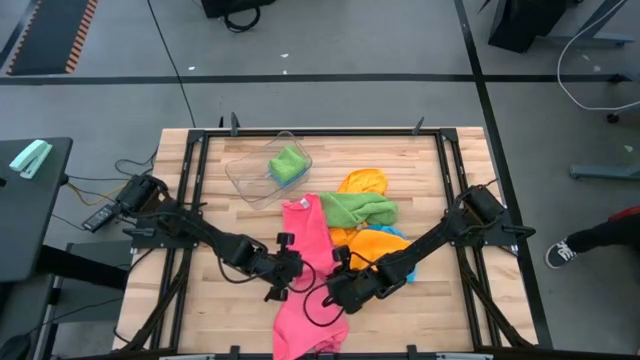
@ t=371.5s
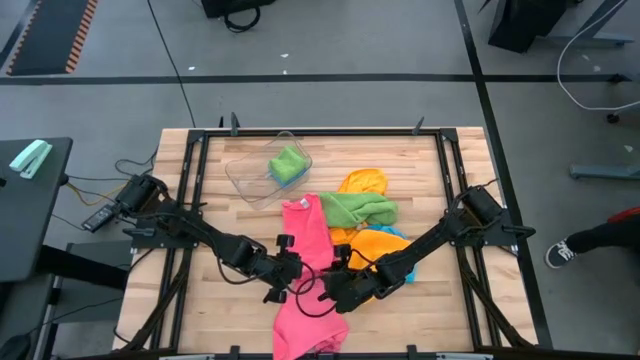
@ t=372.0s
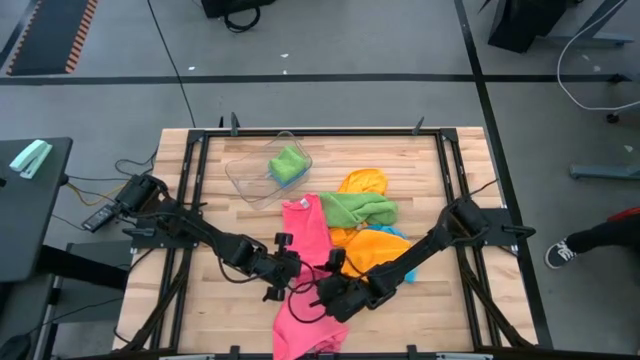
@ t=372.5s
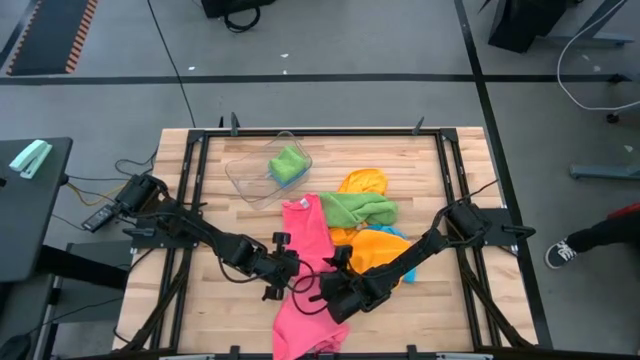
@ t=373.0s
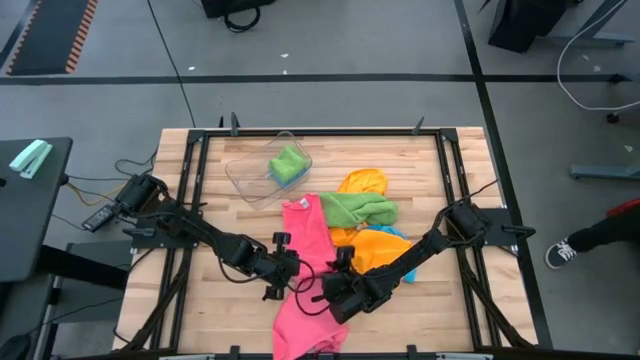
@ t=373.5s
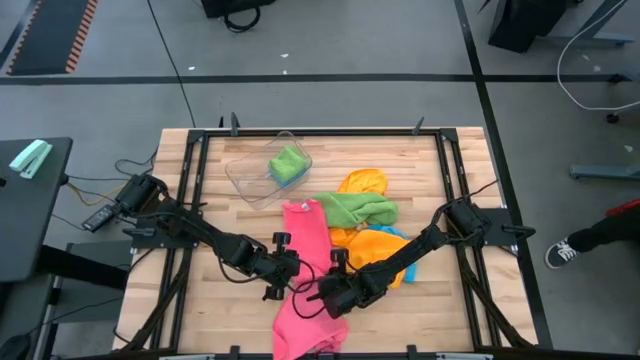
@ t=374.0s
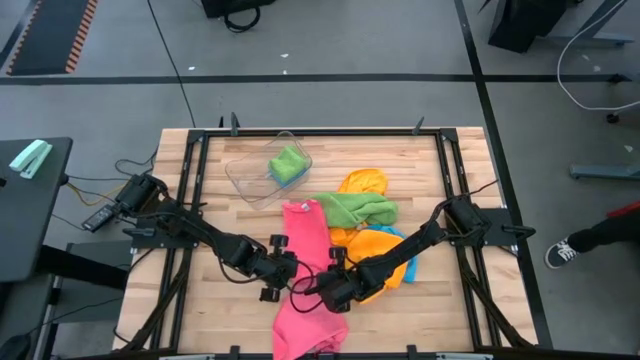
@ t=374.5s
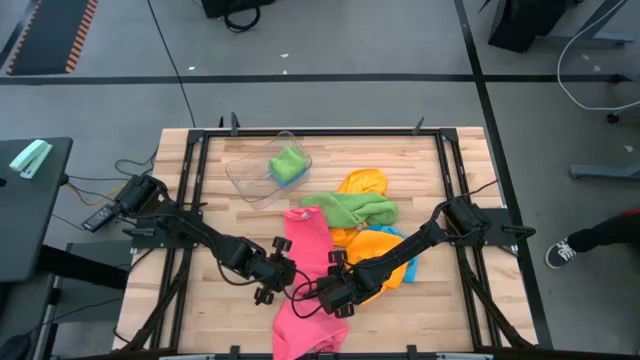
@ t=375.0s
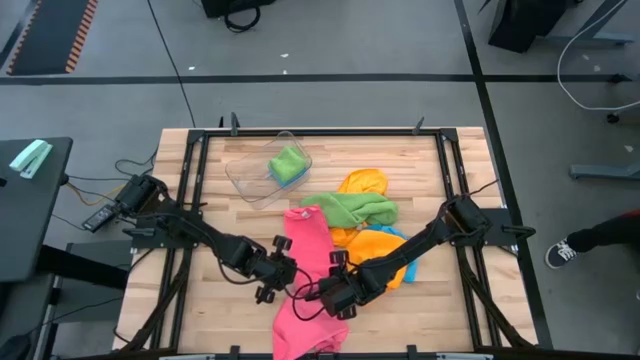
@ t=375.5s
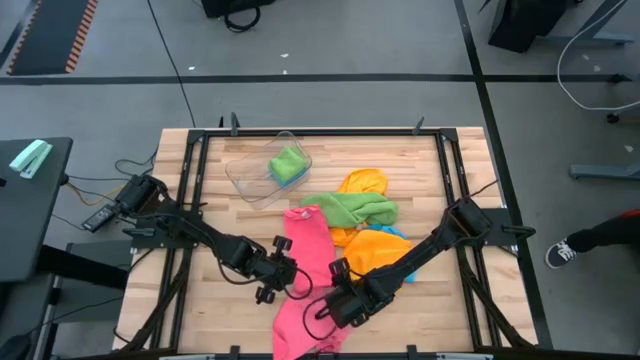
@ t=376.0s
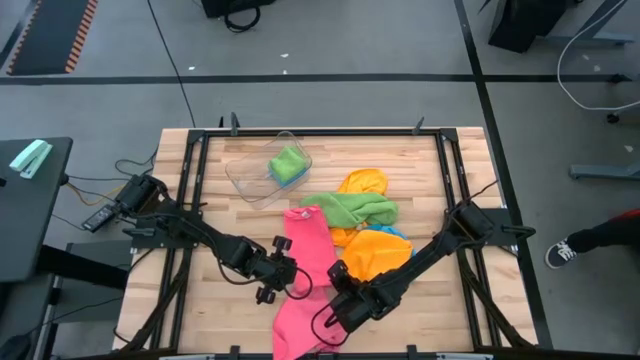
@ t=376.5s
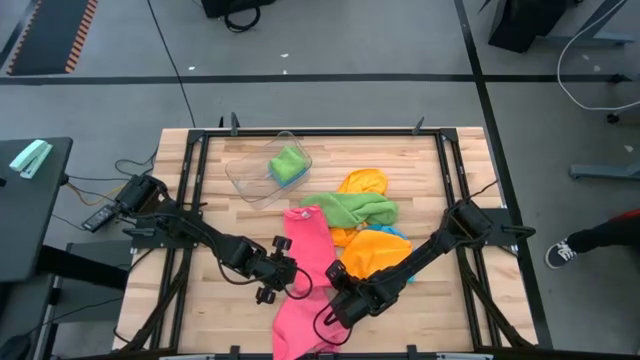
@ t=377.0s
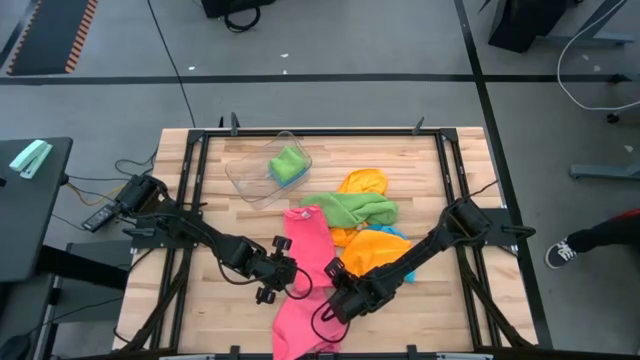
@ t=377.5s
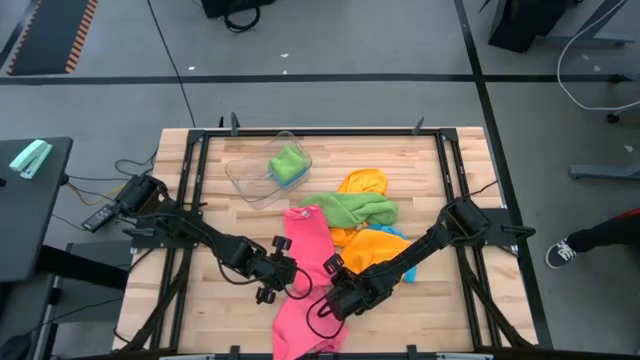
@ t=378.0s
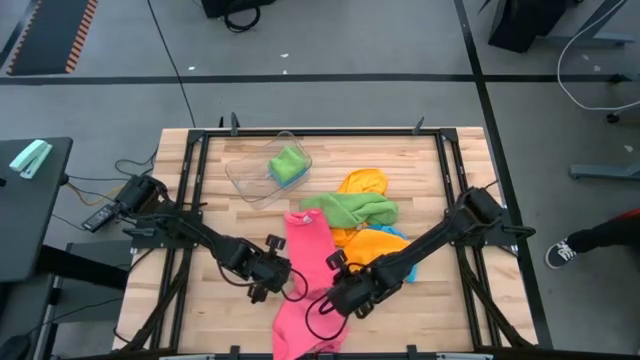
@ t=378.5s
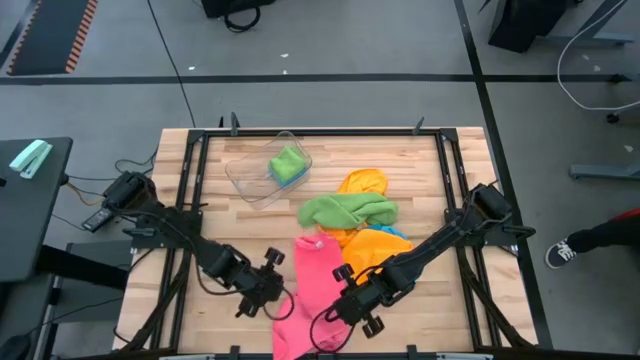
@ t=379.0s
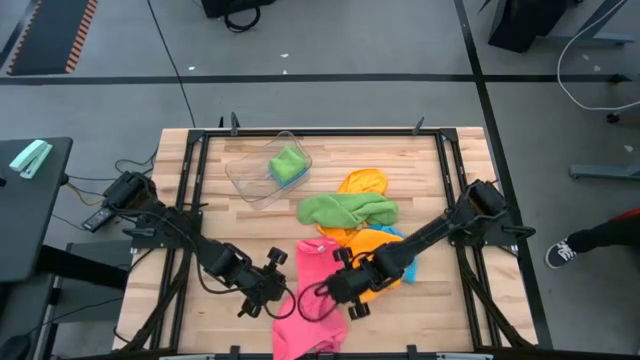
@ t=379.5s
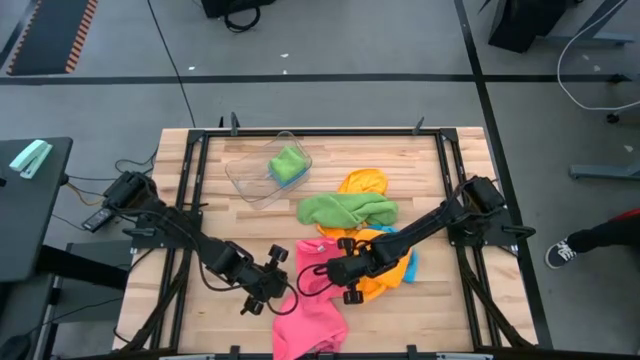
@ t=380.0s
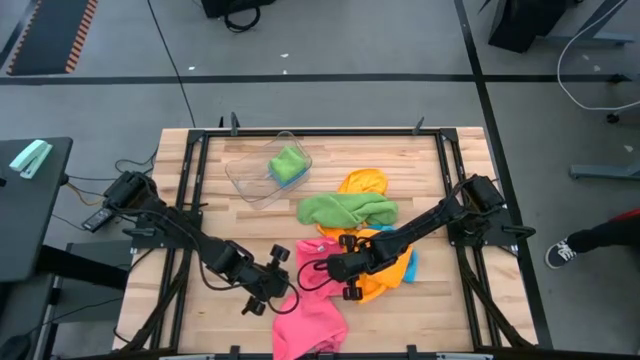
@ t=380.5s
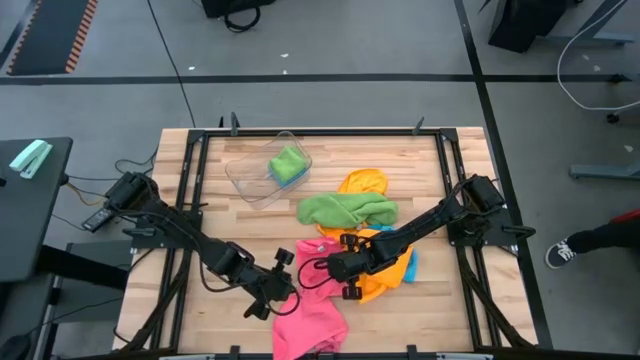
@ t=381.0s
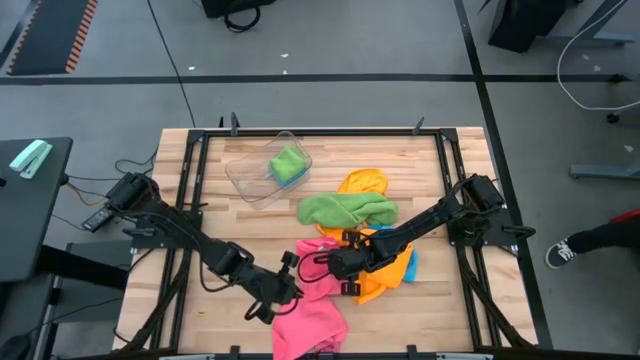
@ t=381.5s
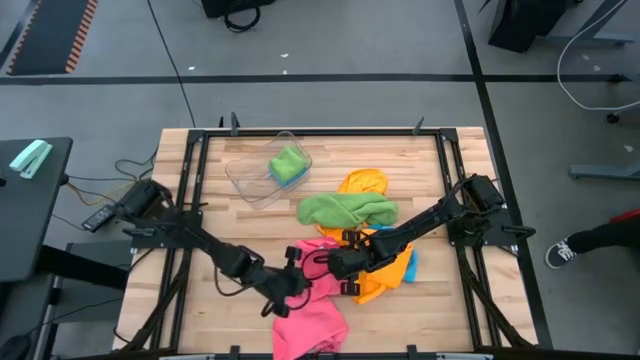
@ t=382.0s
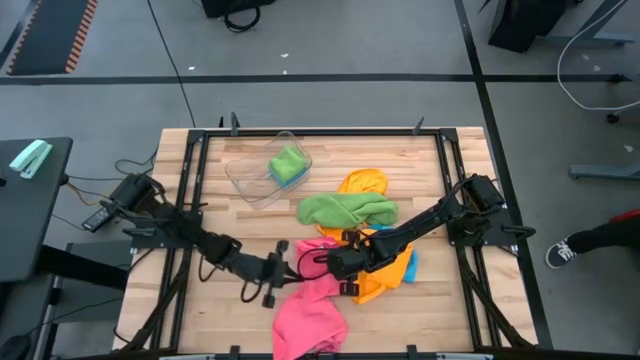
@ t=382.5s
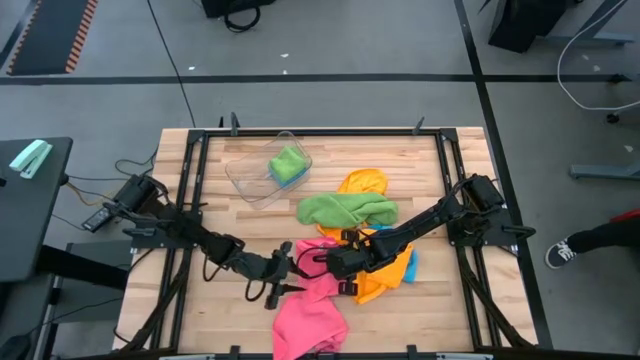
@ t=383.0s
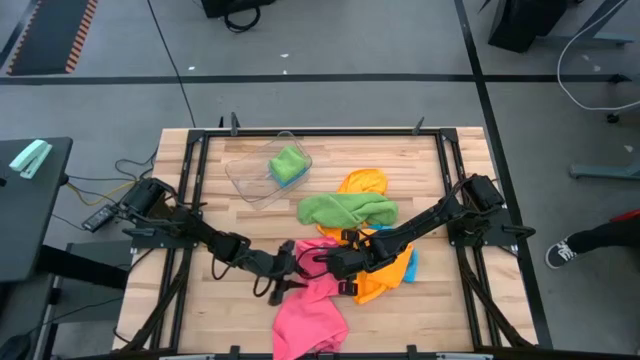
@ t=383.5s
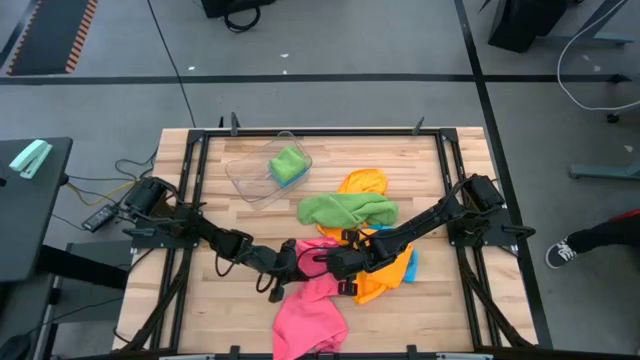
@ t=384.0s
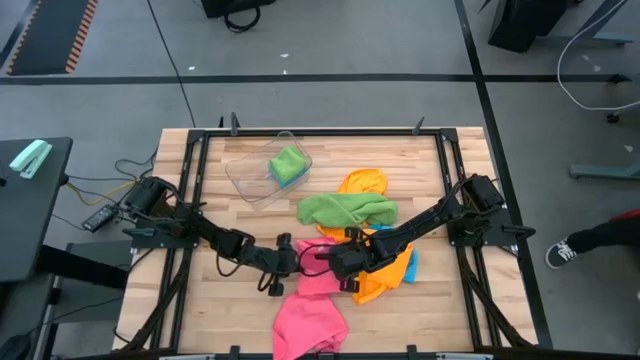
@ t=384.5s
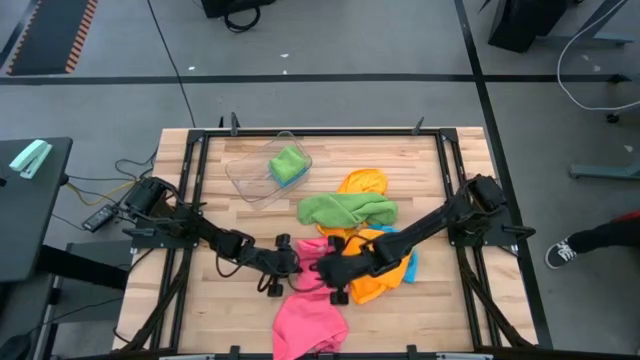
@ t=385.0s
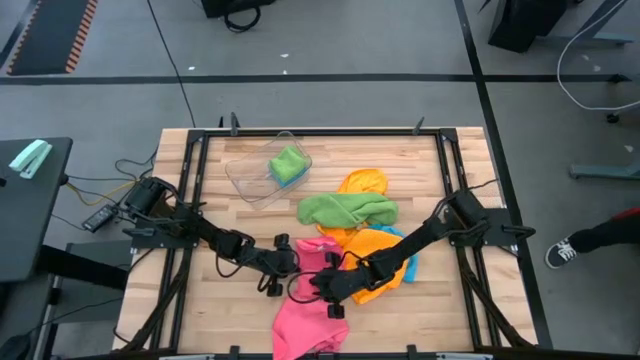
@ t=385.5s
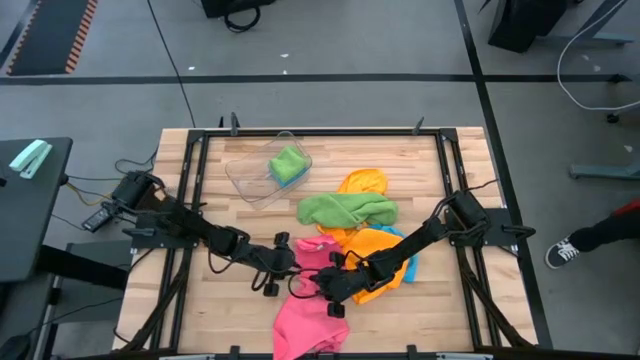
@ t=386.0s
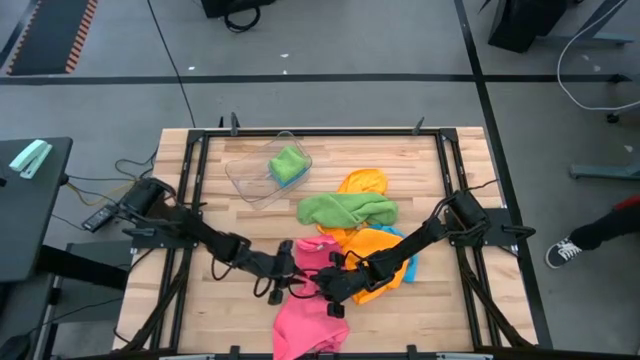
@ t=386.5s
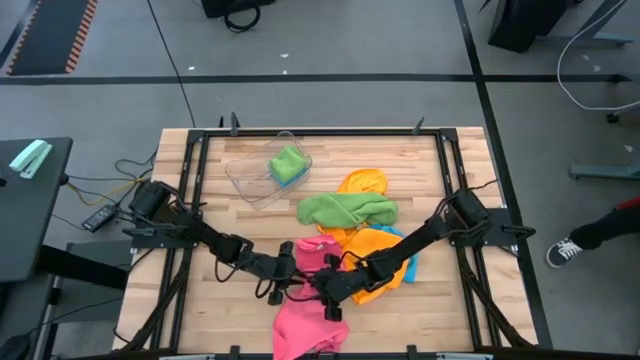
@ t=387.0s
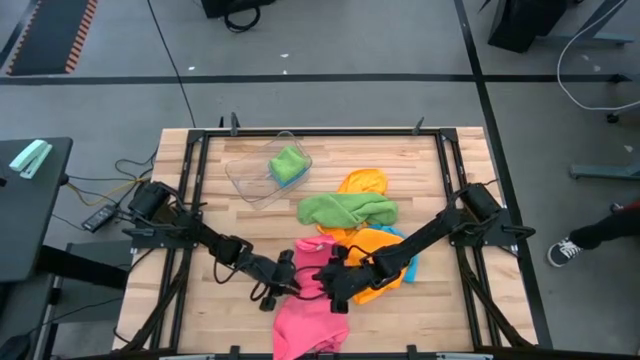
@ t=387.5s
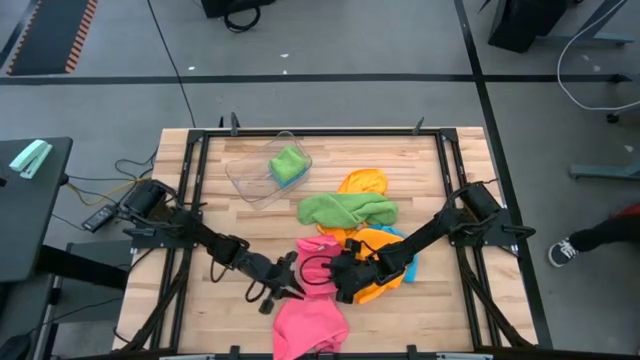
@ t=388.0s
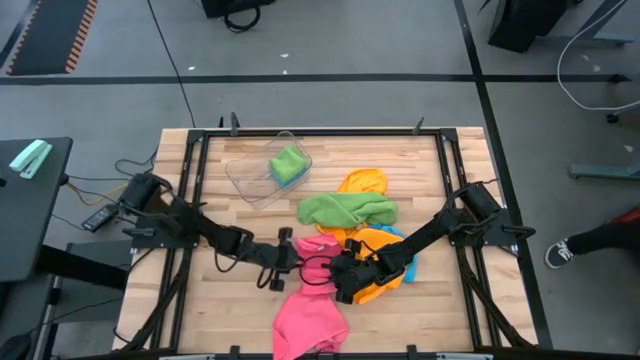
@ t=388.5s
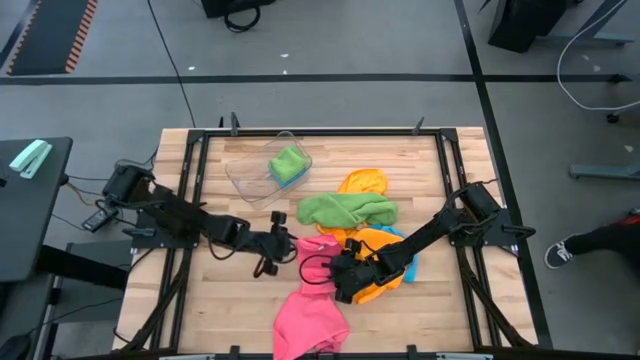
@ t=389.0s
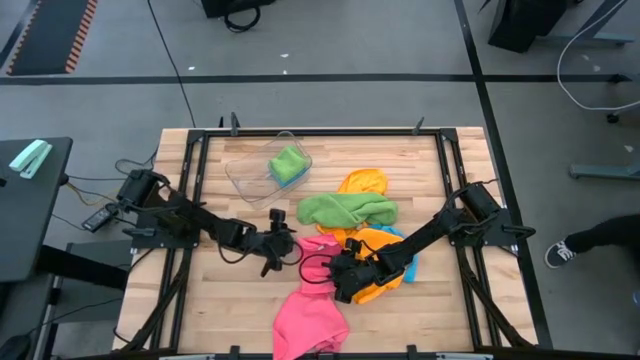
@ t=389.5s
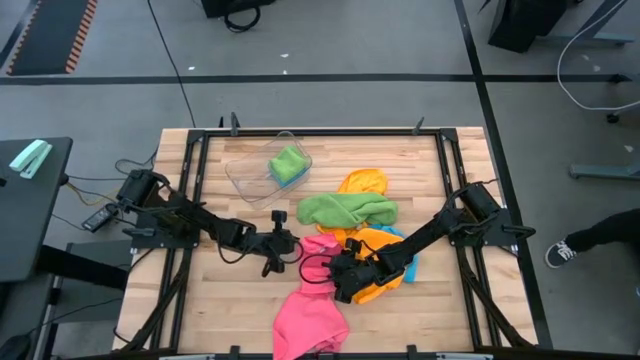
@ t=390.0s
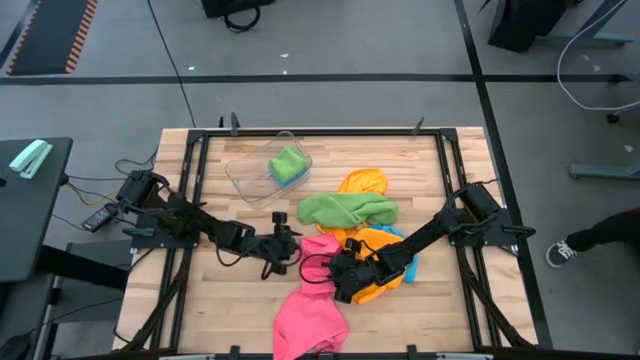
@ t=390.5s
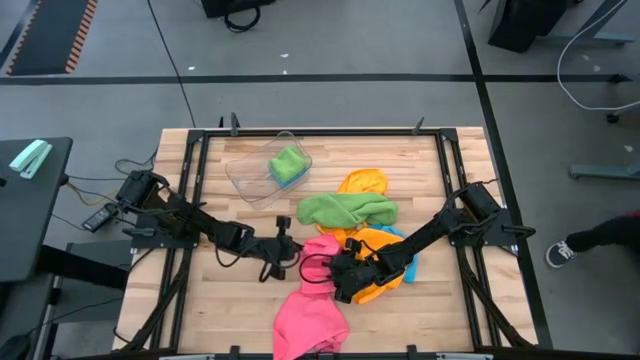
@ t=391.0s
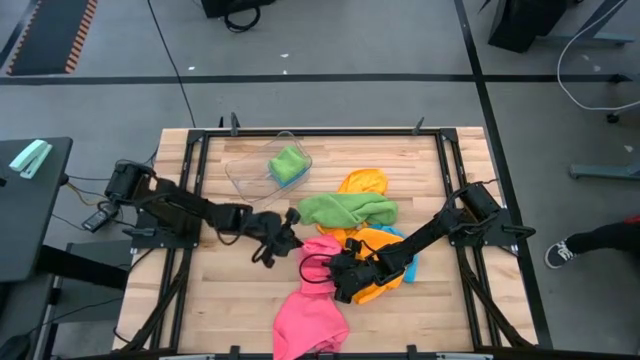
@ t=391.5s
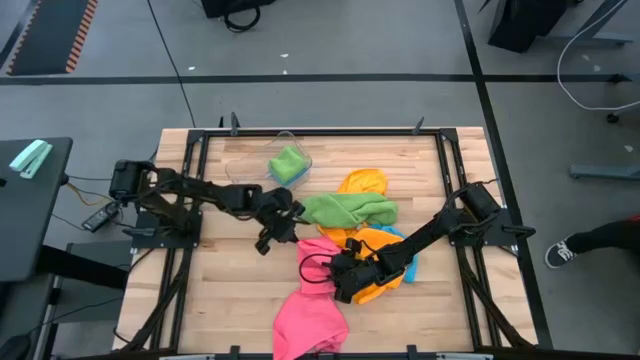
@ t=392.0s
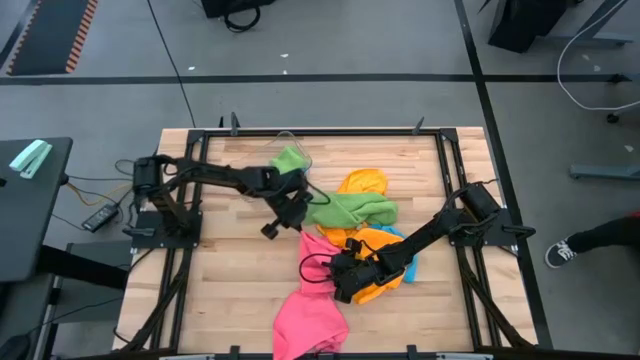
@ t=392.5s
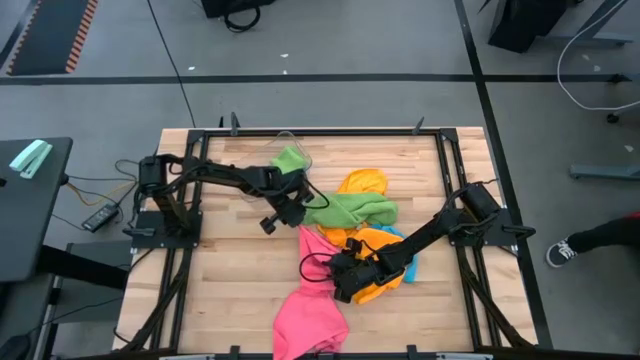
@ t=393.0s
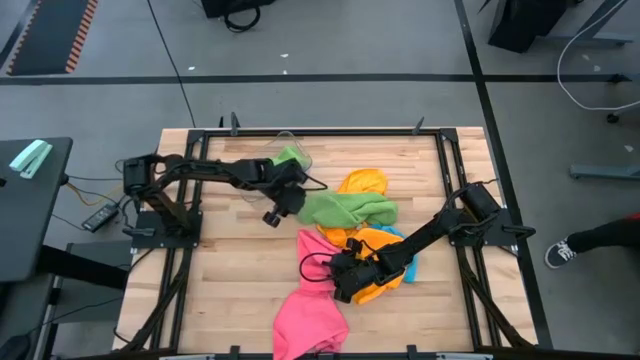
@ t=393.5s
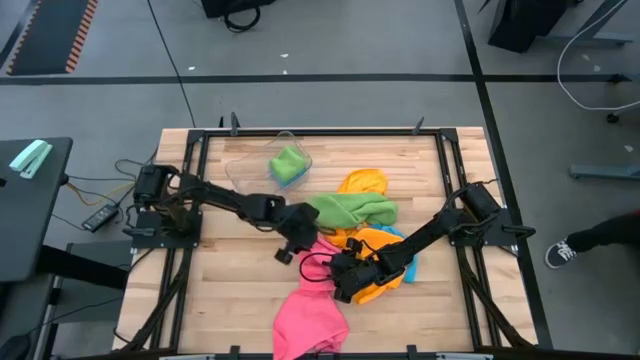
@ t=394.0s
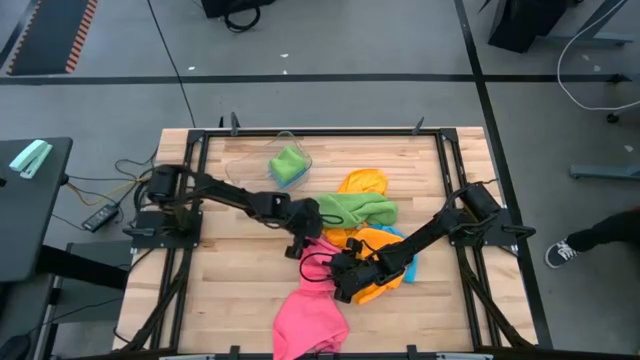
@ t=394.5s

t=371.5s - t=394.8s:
Task: Fold microfiber towels
Fold the left pink microfiber towel
